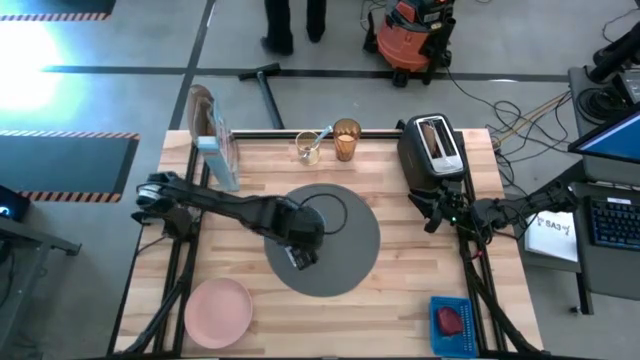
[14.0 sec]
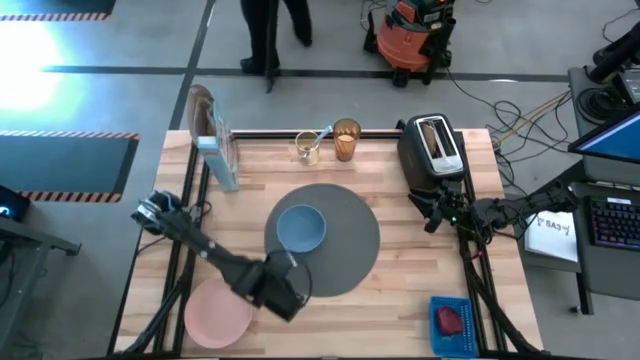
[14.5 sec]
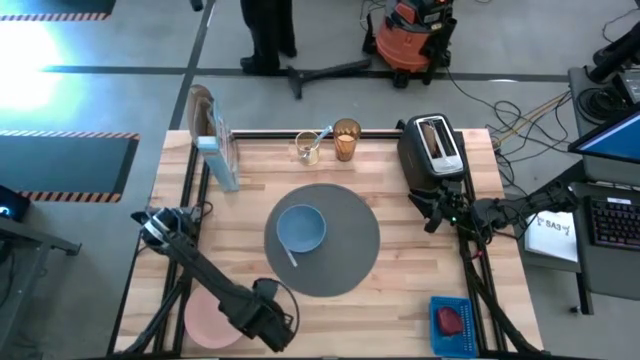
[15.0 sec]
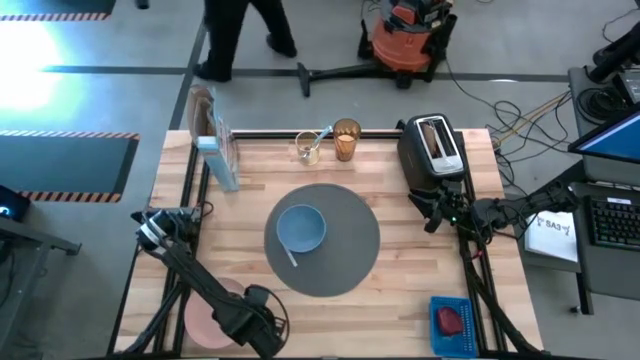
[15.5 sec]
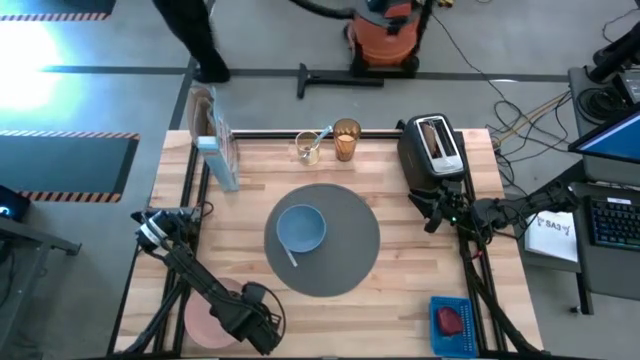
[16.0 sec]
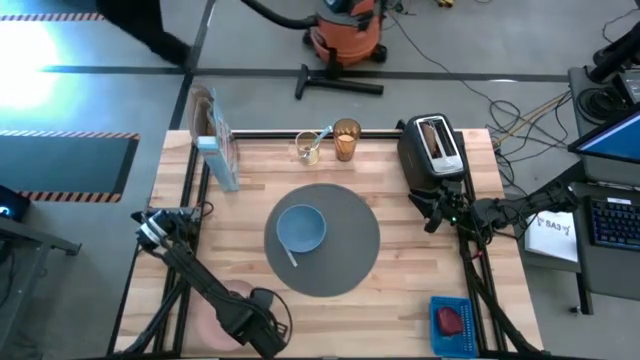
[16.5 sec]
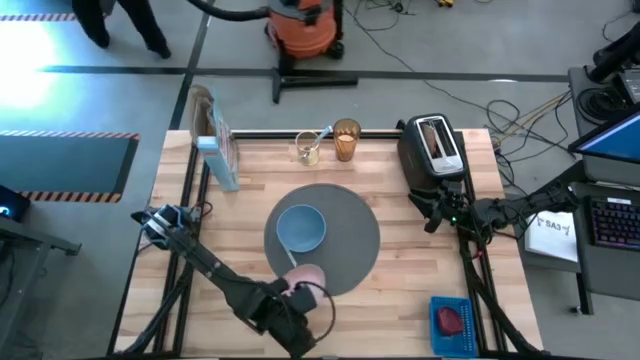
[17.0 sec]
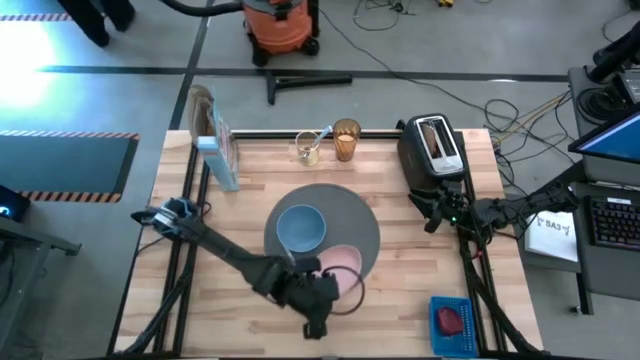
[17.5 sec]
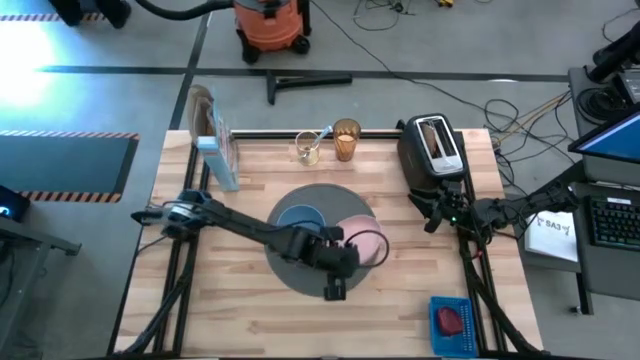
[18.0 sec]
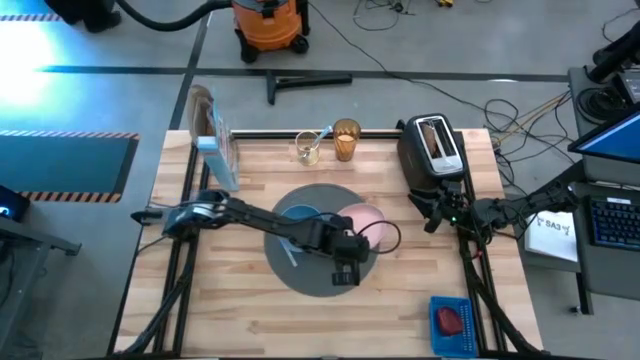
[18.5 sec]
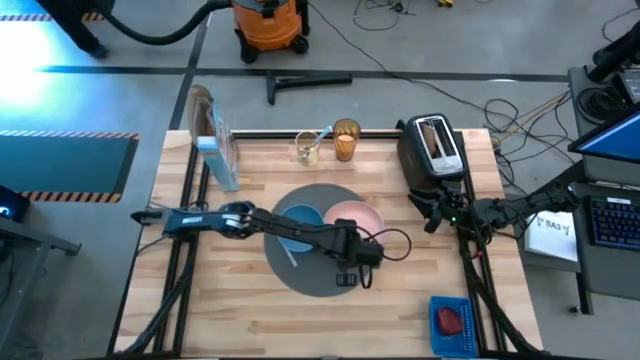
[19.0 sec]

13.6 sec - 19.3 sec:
Task: Arrange a breakfast setting
Put the pink plate on the gray table mat to the right of the blue bowl

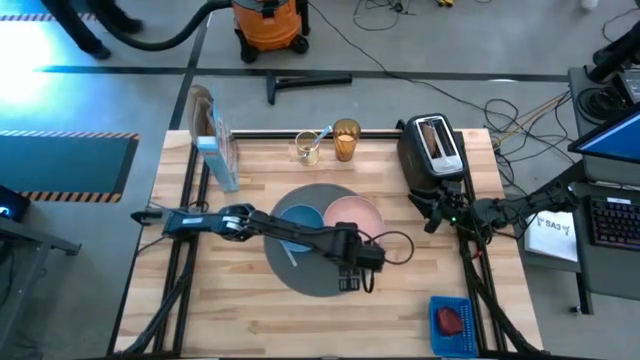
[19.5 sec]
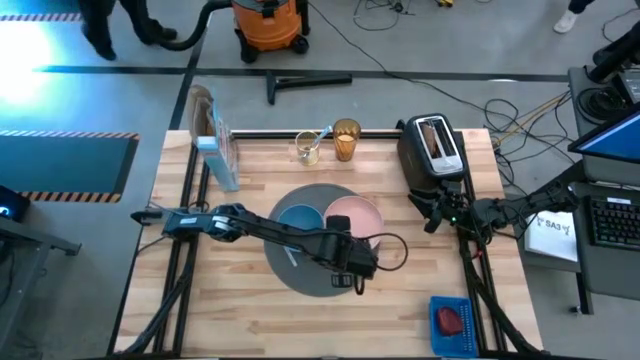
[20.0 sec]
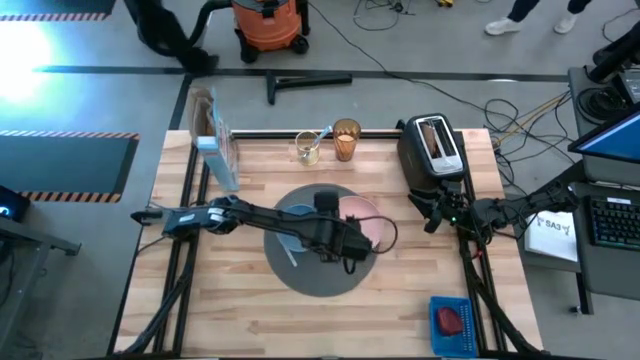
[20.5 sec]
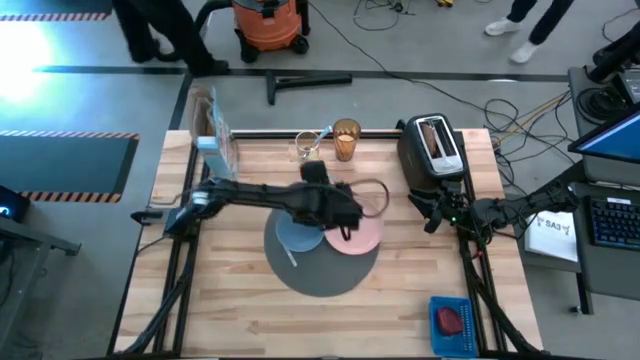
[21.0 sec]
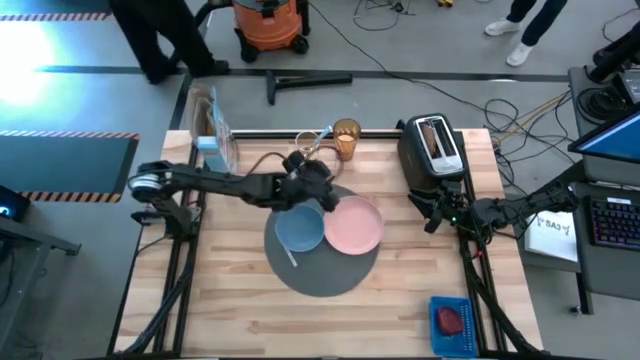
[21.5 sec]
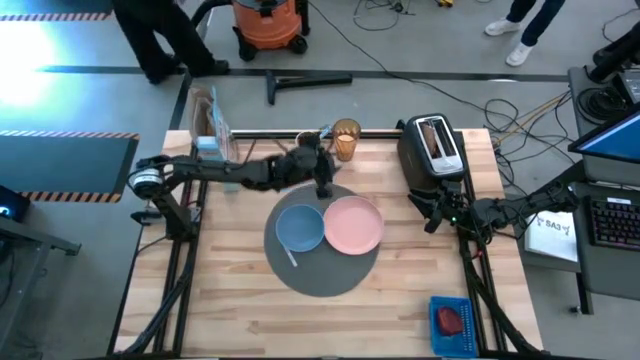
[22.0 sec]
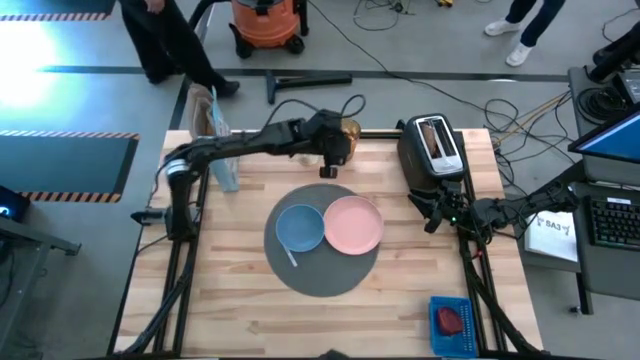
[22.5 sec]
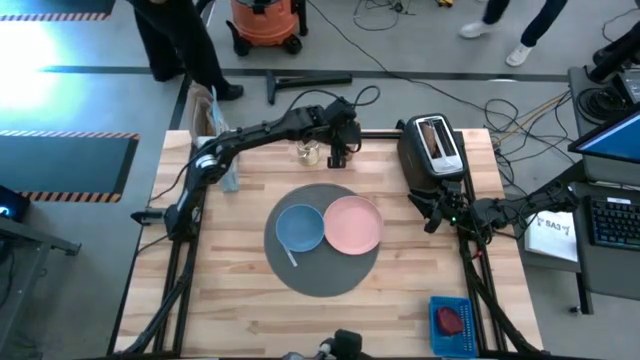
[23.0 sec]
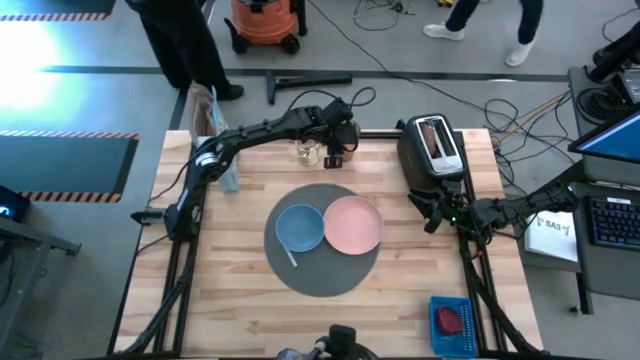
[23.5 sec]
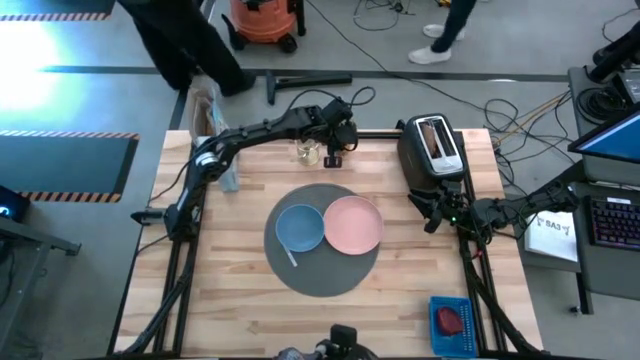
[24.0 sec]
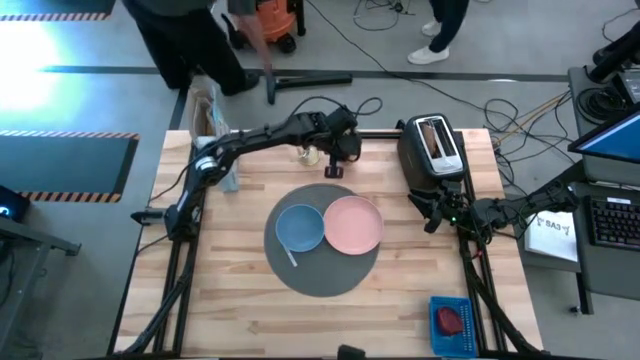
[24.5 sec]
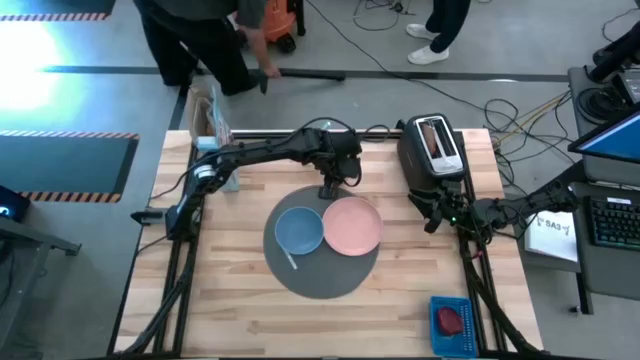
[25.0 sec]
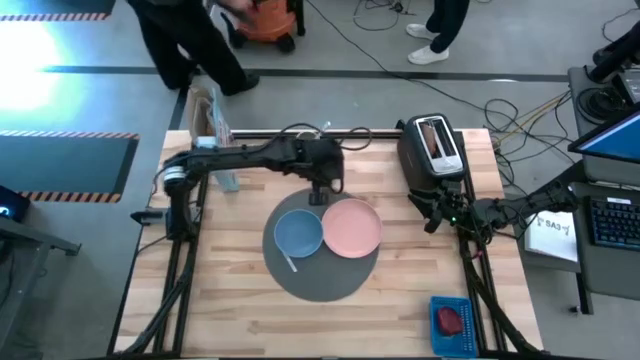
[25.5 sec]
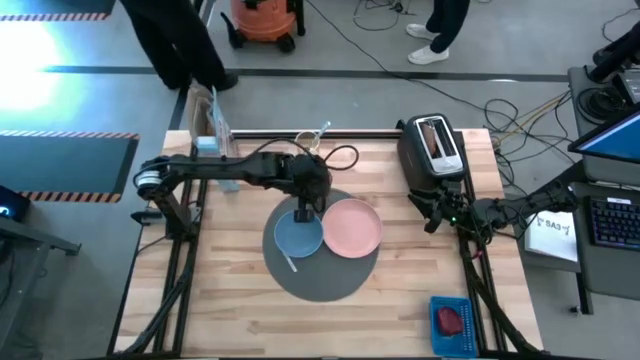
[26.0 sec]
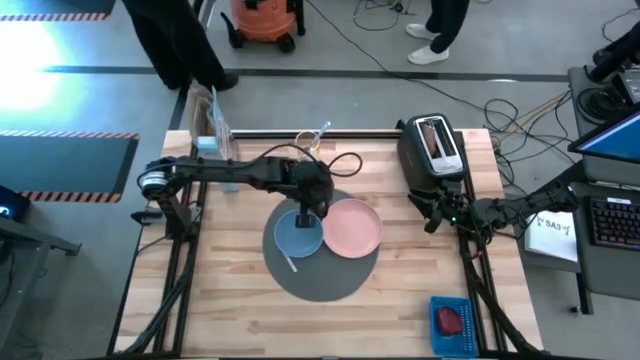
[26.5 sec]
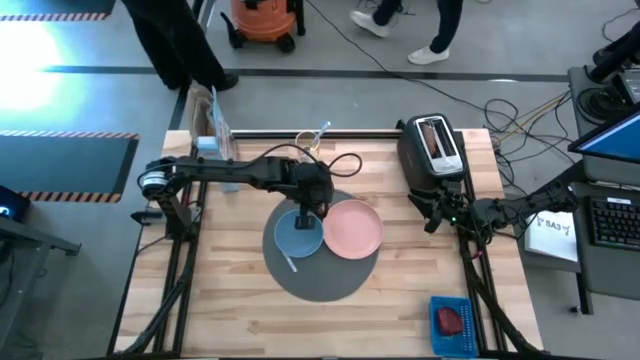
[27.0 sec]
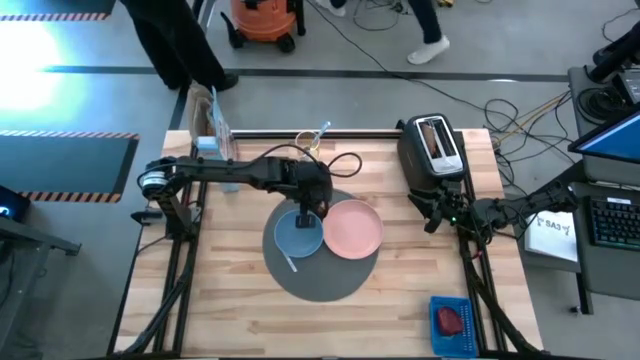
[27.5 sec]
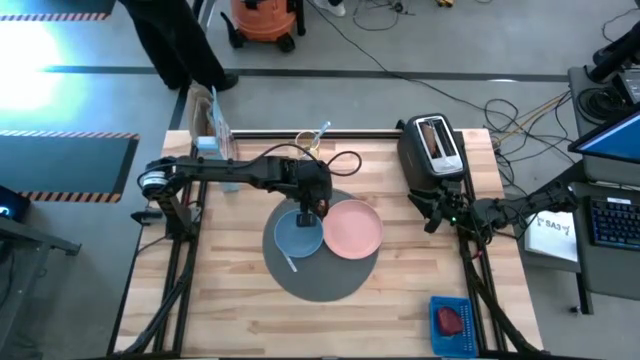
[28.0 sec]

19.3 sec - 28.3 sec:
Put the milk to the top middle of the gray table mat

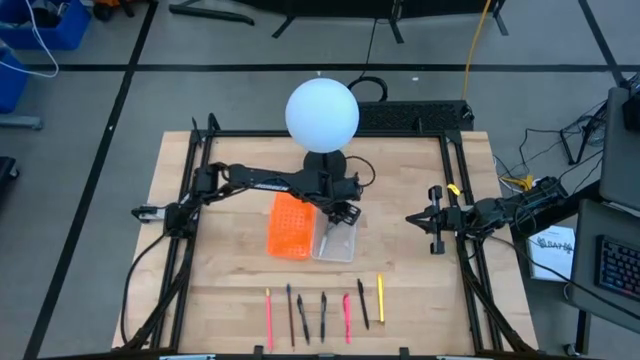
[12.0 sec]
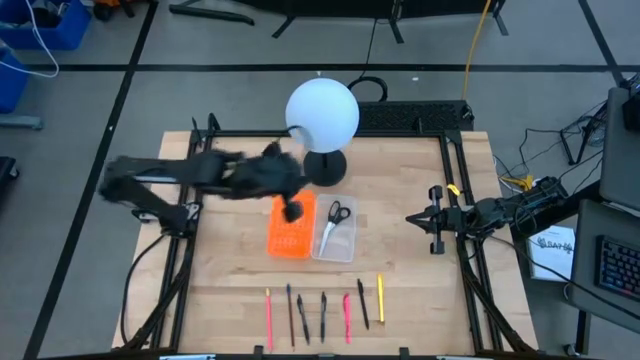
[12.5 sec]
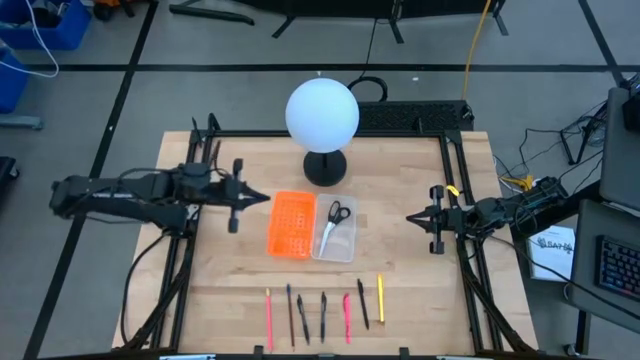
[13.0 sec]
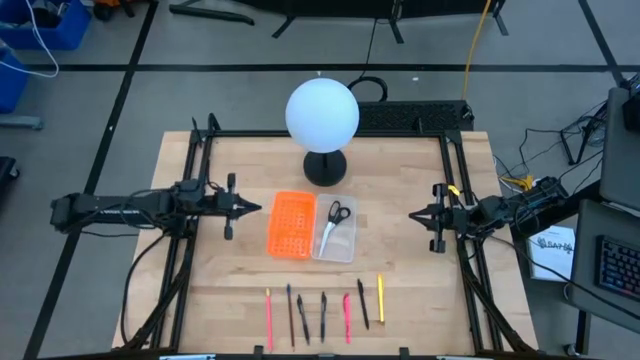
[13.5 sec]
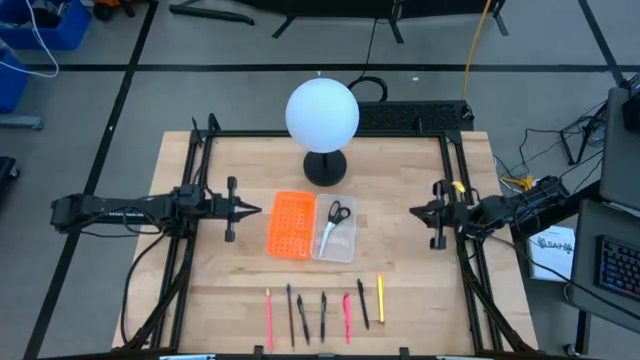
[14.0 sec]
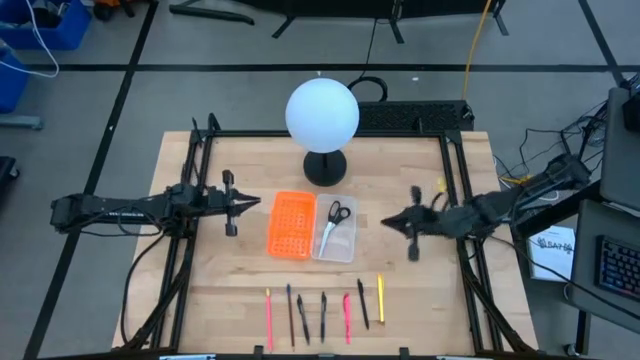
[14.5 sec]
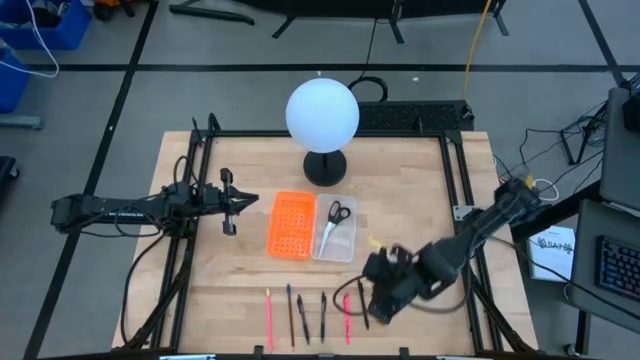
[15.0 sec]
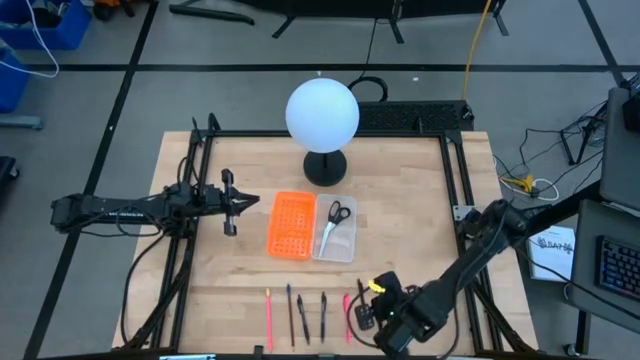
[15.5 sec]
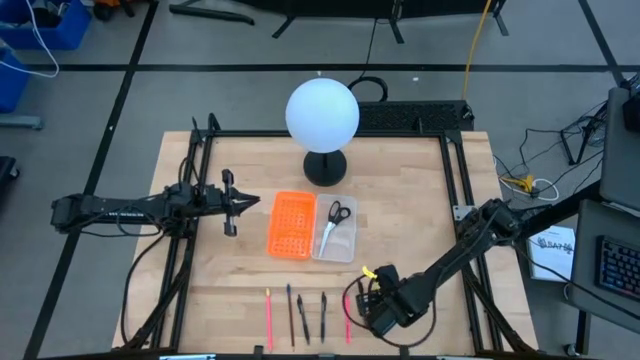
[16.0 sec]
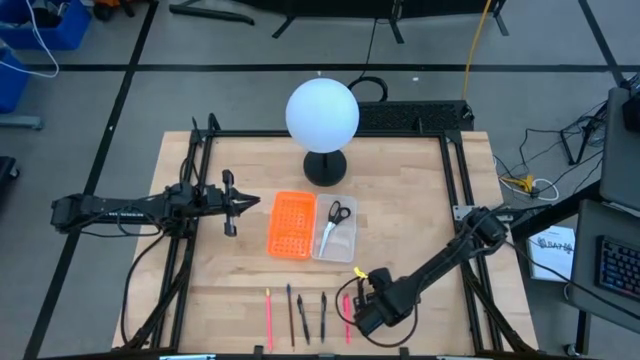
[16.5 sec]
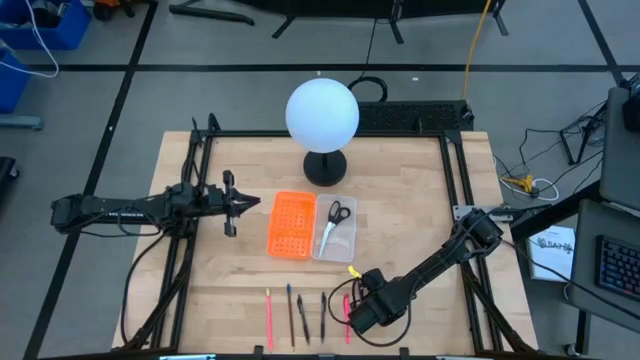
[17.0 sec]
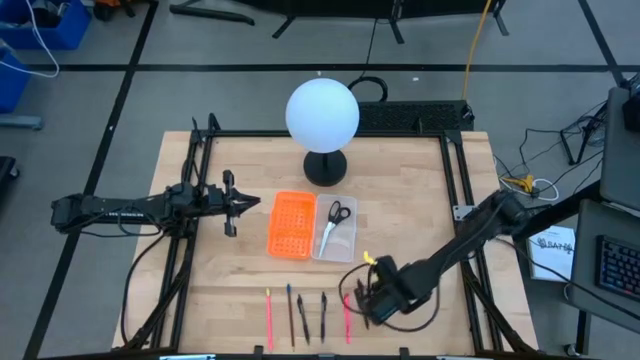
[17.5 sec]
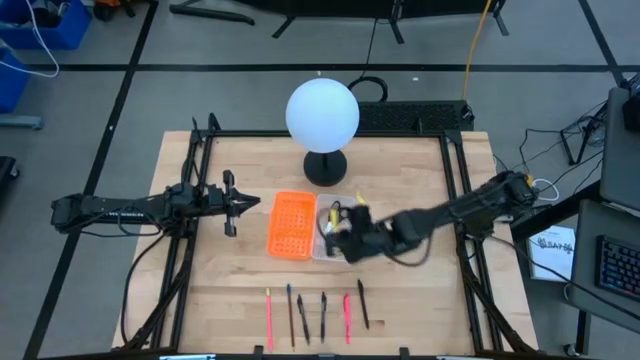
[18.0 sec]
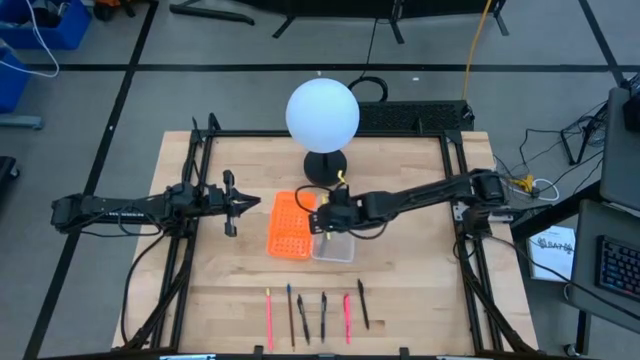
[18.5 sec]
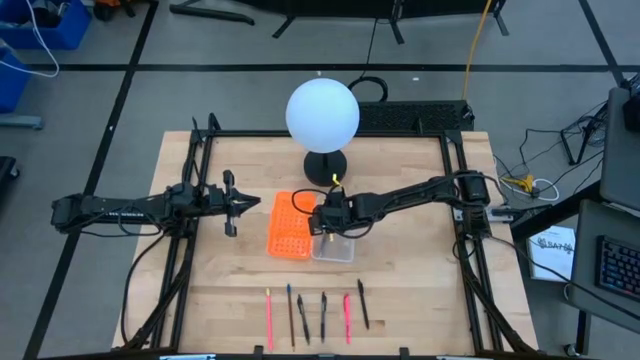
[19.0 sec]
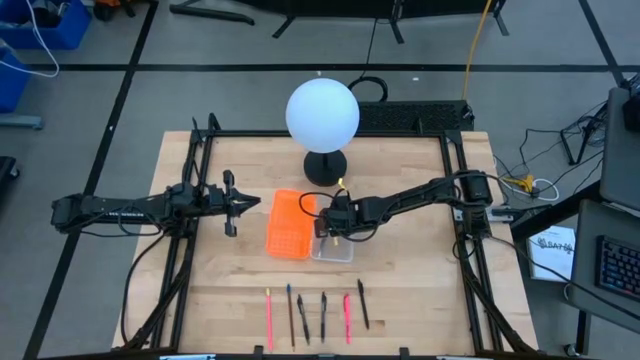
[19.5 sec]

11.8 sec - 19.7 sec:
Task: Pick & place school supplies into a supply box
Put the yellow pen into the orange supply box
